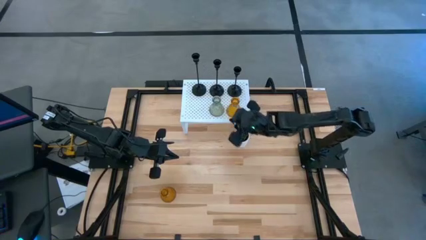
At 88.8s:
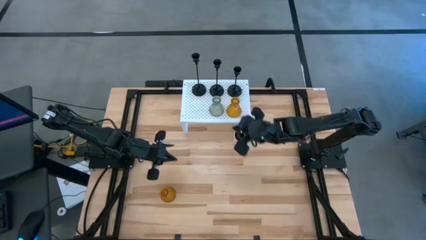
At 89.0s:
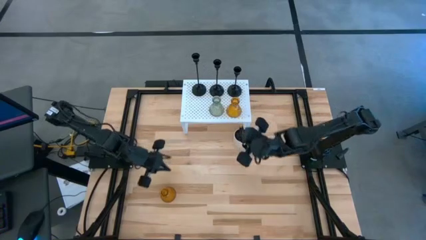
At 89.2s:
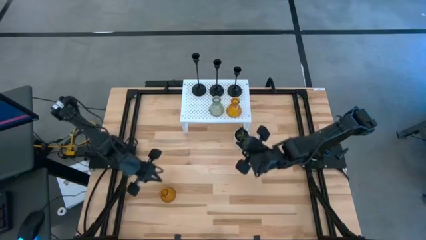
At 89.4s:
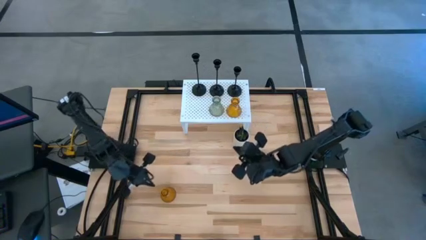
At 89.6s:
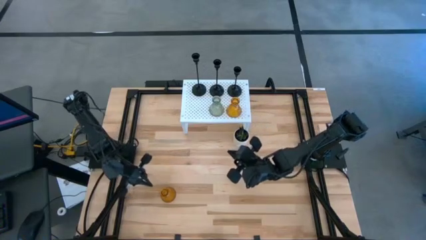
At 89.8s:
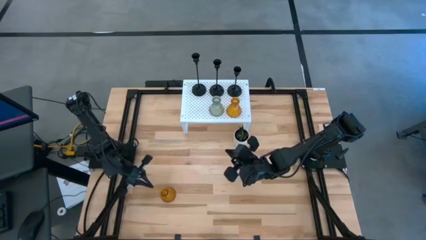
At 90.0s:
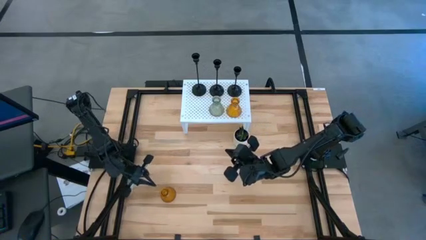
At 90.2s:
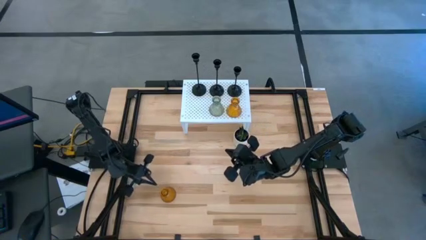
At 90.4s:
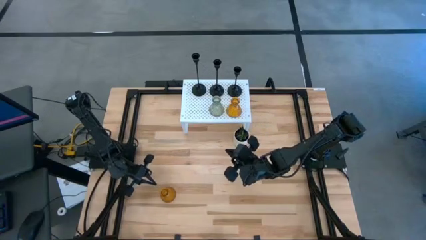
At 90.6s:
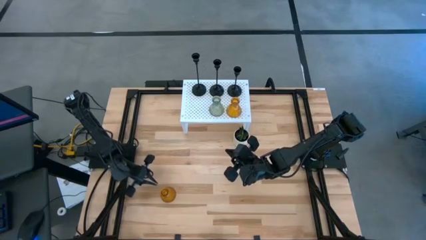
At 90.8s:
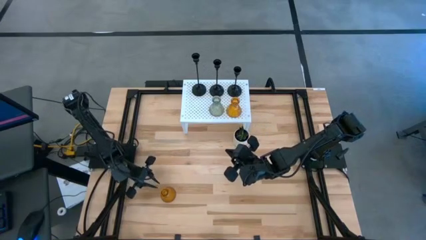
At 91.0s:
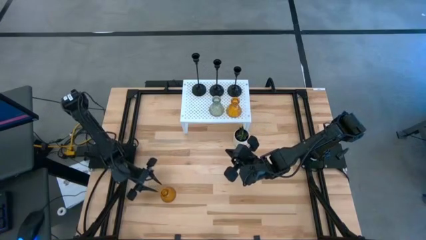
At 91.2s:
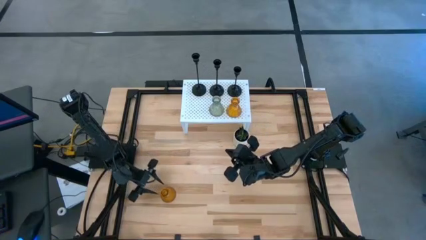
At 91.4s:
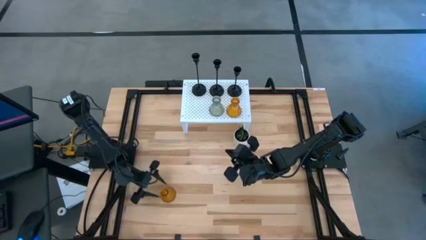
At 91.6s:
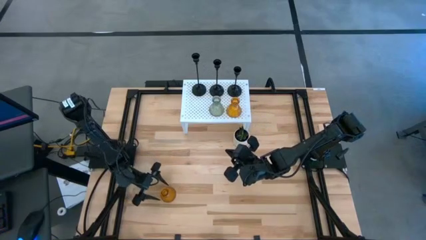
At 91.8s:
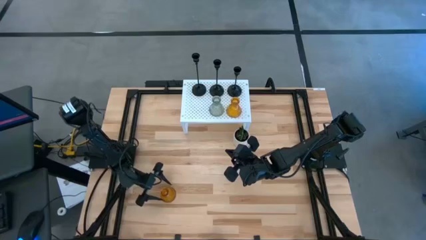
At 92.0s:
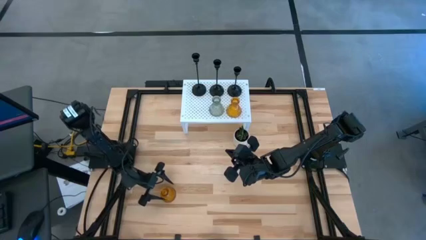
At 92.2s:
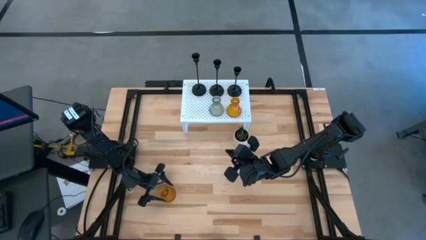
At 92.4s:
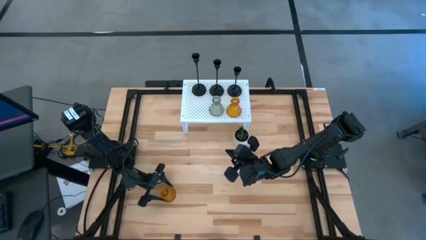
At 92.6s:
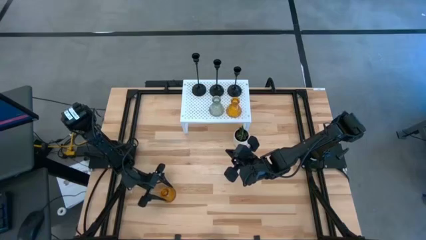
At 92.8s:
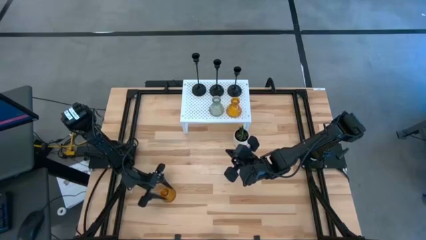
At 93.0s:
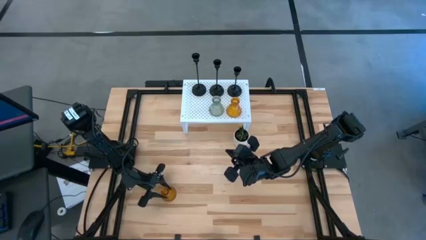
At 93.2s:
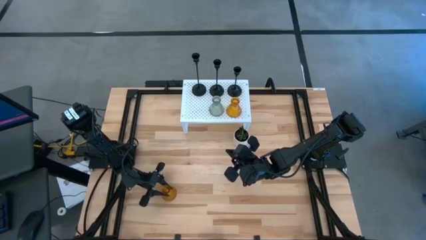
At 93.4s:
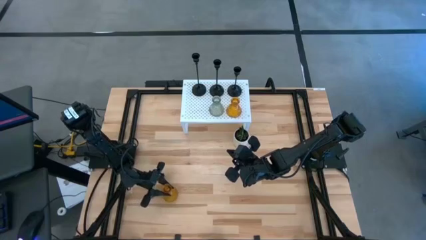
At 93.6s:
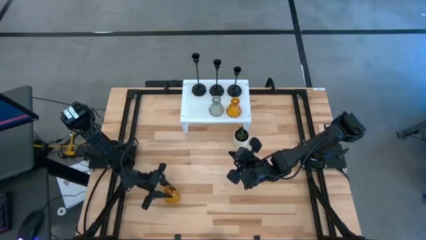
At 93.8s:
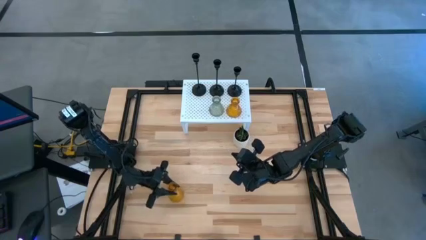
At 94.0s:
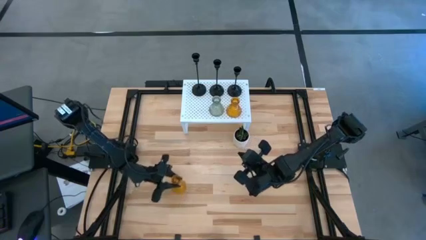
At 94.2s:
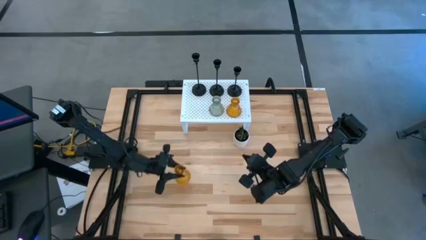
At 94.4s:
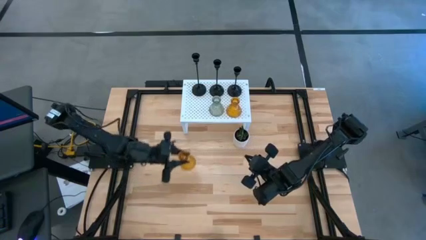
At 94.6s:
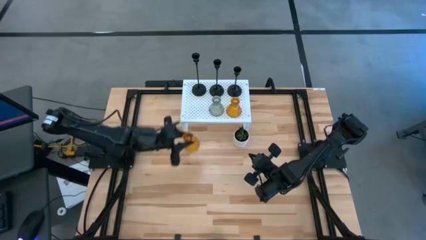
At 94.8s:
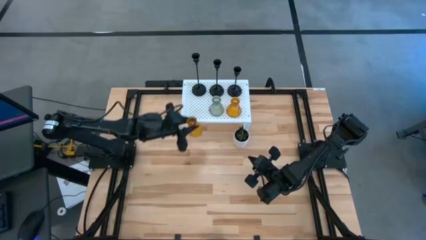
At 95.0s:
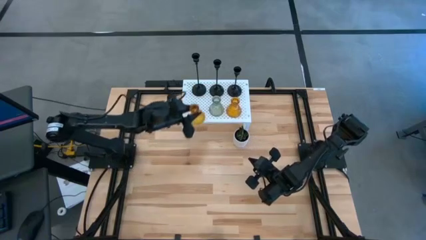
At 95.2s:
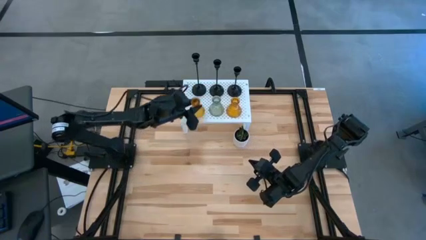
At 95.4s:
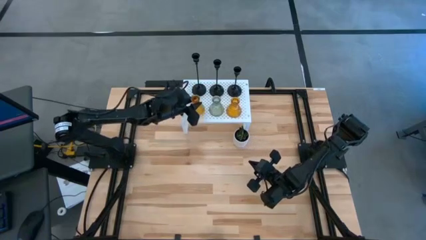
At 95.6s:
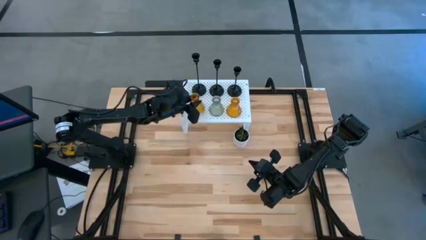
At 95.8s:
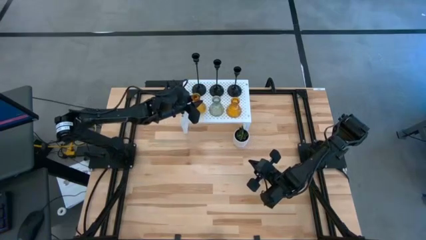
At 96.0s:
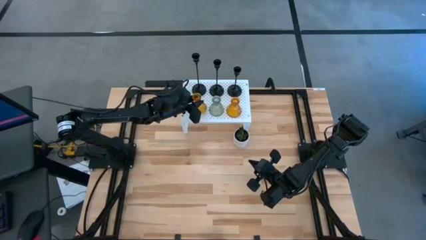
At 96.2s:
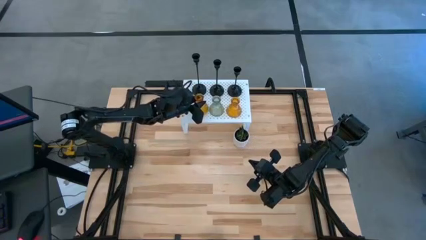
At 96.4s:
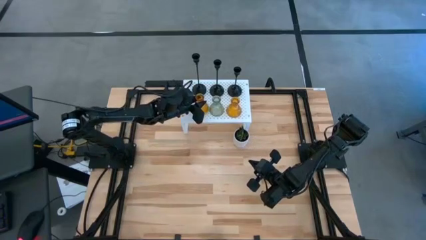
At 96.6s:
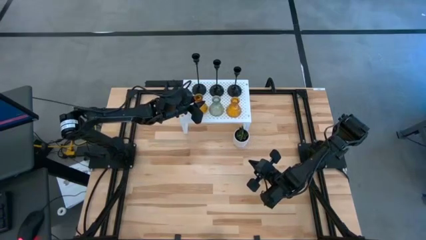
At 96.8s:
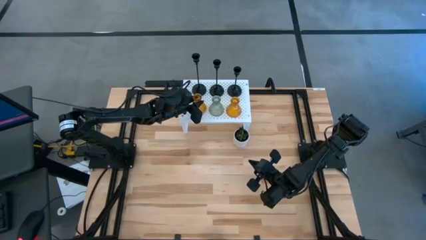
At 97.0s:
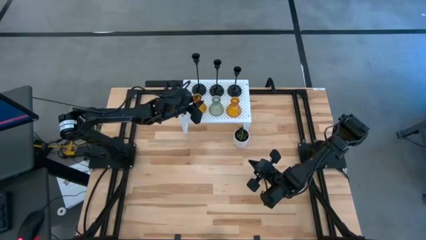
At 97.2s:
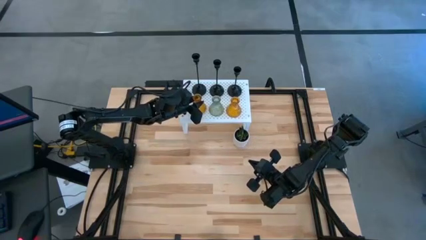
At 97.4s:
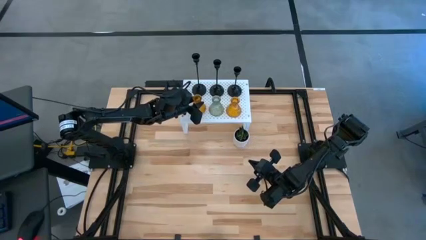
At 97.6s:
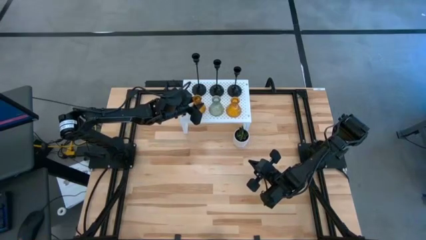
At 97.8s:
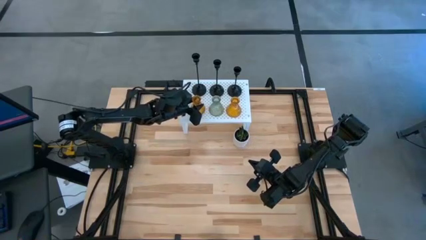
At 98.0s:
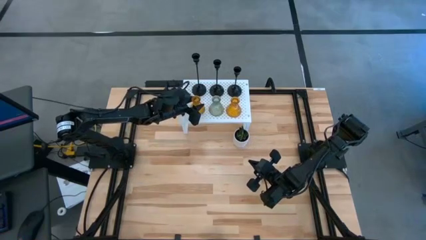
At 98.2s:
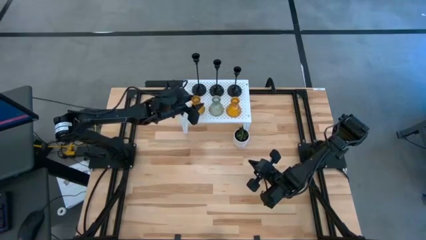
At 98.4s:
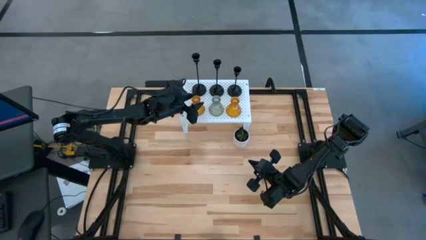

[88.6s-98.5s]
Task: Pick & Place candle stick holders
Put the orange glass candle holder on the shelf

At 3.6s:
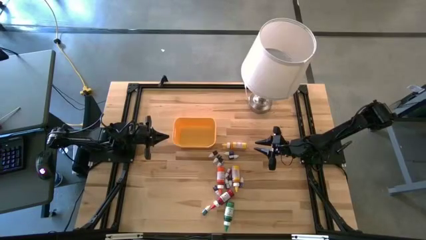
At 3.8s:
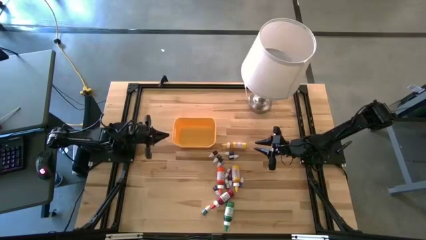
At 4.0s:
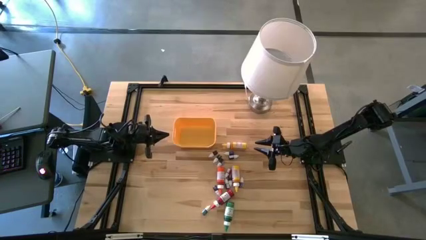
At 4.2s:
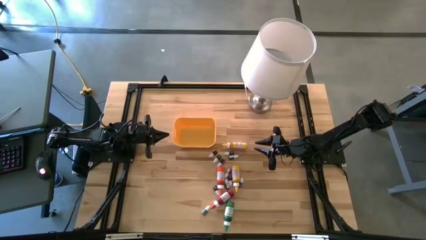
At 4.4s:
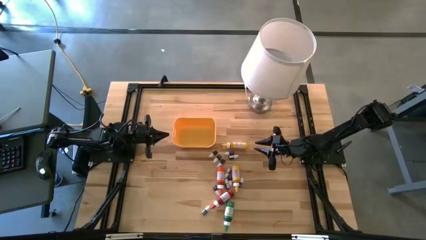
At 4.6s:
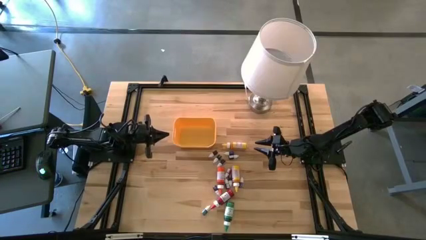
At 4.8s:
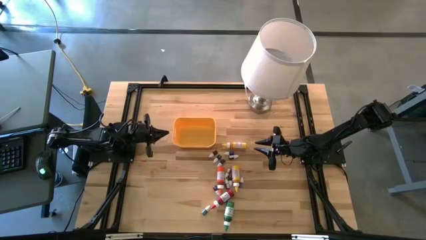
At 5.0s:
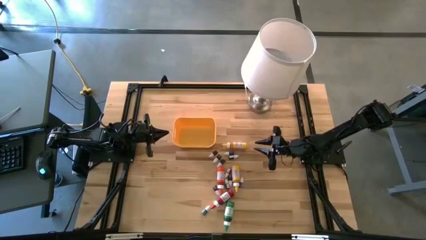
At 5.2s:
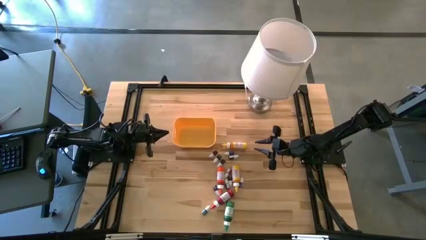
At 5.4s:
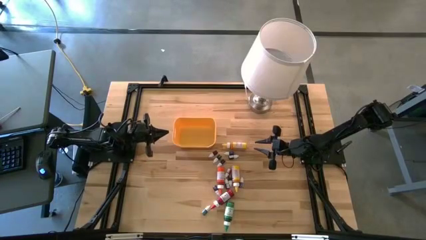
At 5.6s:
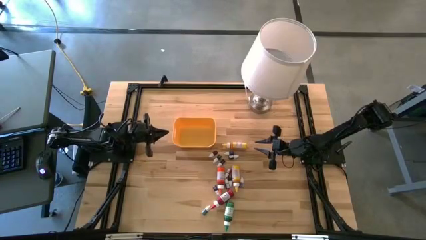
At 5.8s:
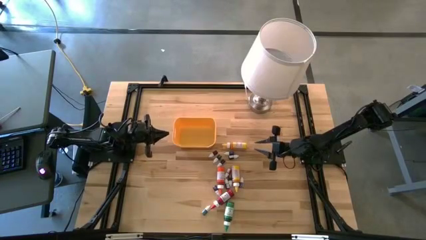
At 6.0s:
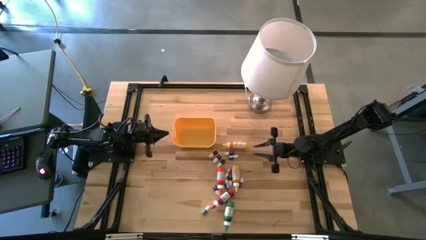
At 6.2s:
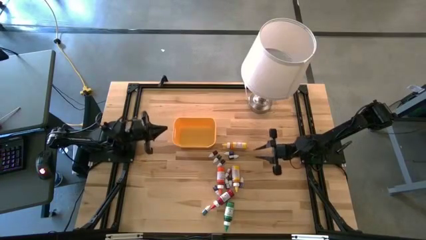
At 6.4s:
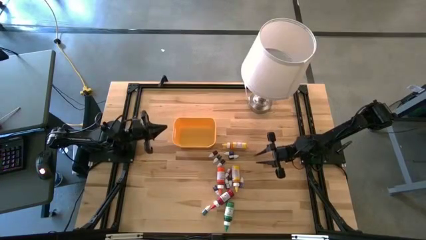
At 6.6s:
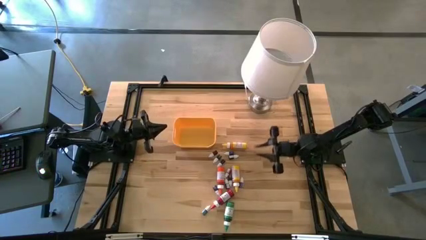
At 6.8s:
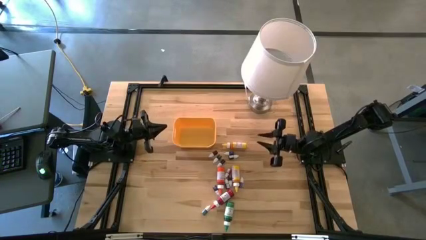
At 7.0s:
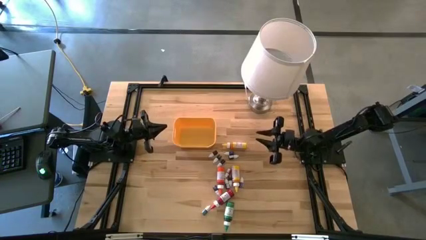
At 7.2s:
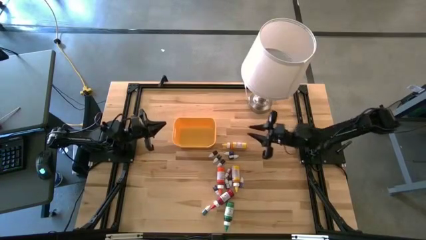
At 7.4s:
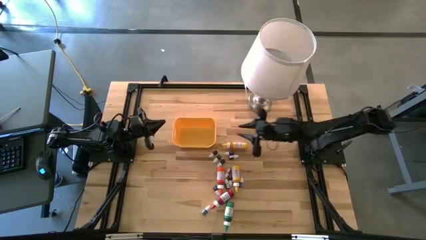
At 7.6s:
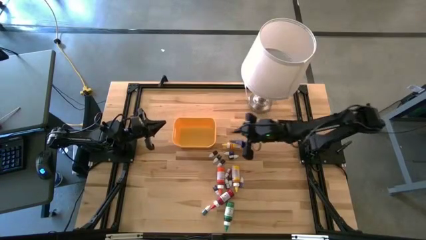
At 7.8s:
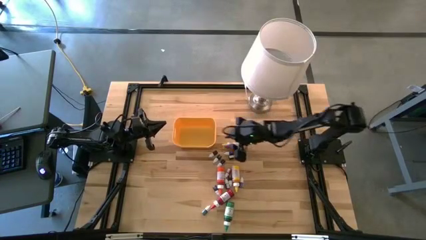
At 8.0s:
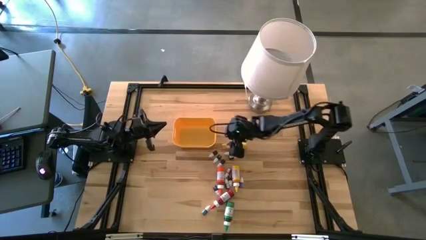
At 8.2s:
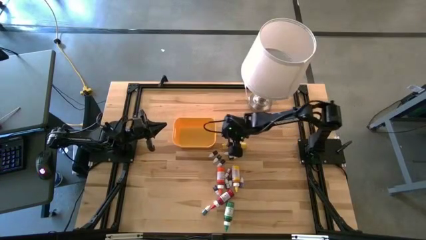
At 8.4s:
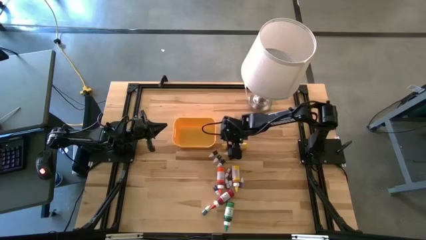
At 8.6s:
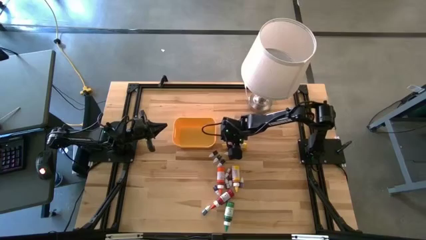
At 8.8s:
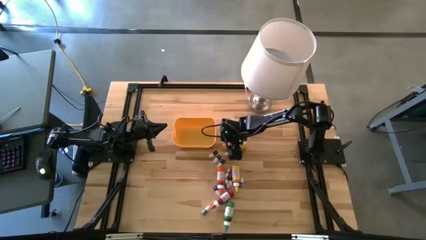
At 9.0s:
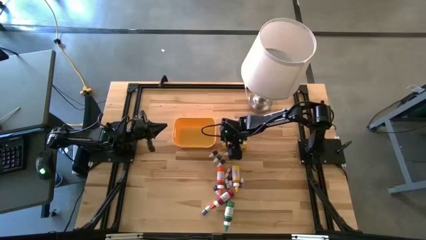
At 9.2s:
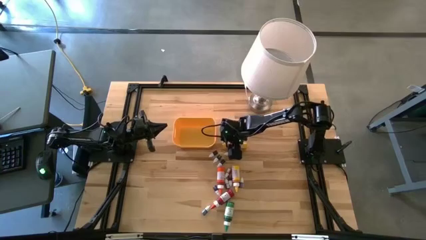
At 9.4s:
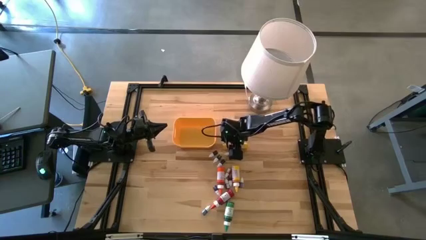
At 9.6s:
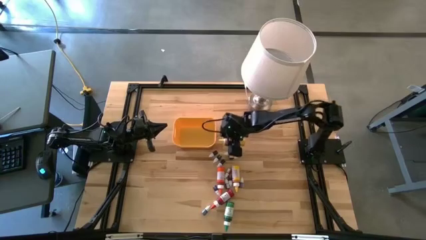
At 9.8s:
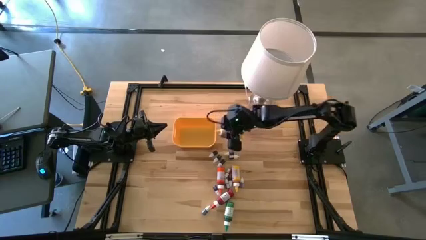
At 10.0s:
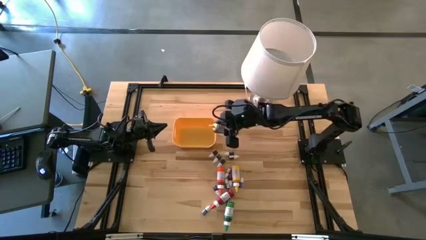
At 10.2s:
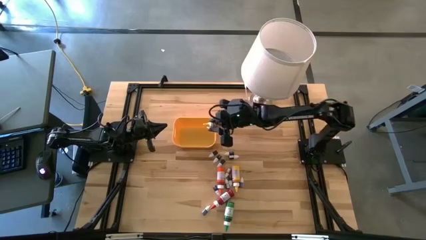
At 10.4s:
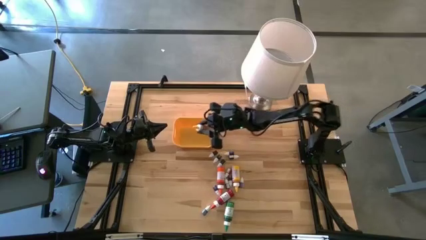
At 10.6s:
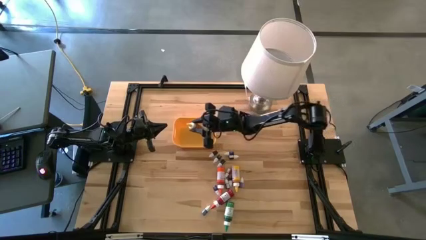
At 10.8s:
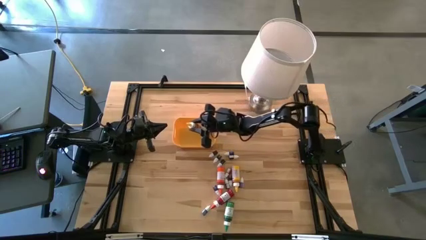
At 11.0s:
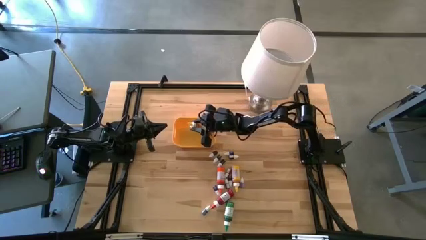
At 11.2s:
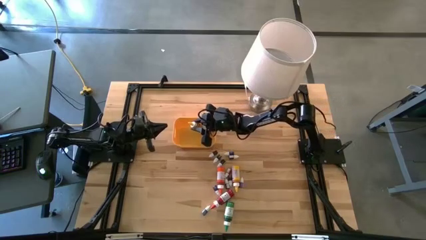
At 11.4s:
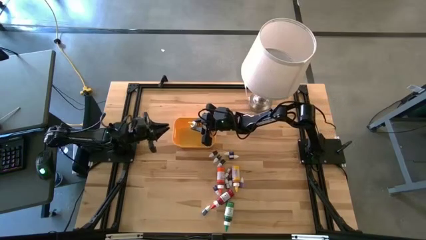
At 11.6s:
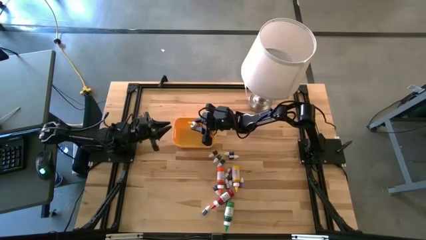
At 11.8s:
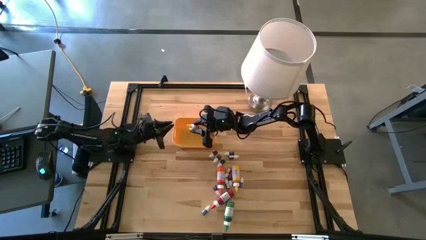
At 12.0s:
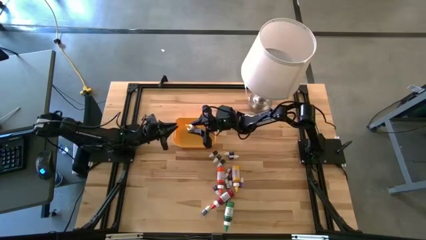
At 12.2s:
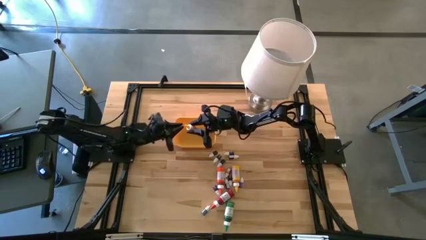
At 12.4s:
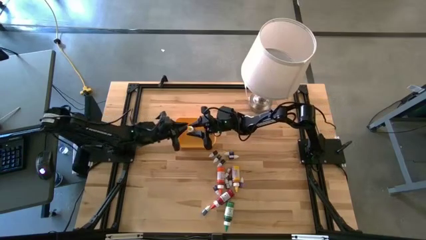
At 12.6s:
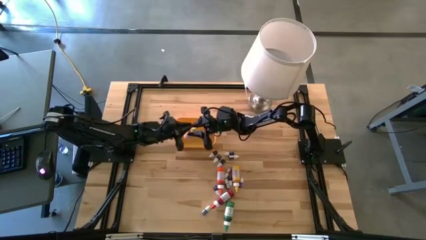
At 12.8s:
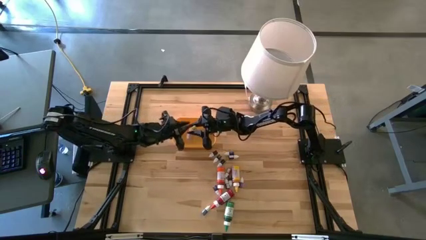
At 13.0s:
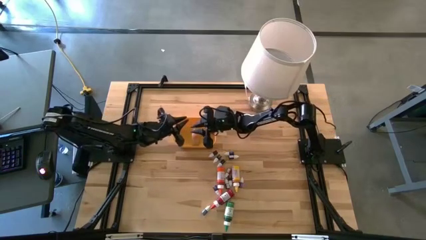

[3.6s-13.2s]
Task: Pick & Place food coloring
Put the large yellow food coloring bottle into the yellow bin
